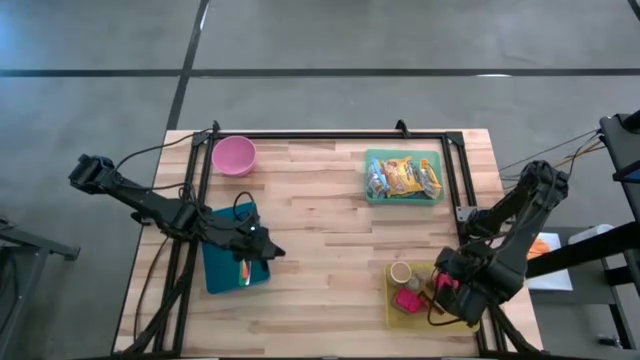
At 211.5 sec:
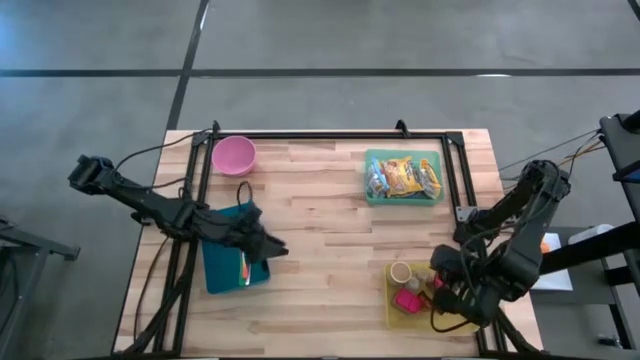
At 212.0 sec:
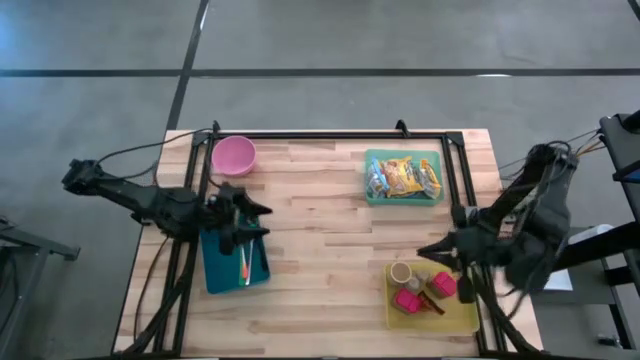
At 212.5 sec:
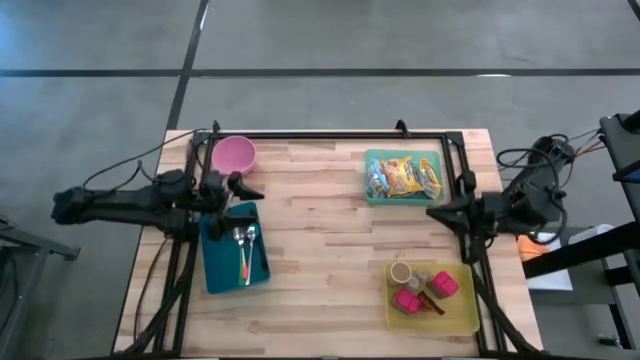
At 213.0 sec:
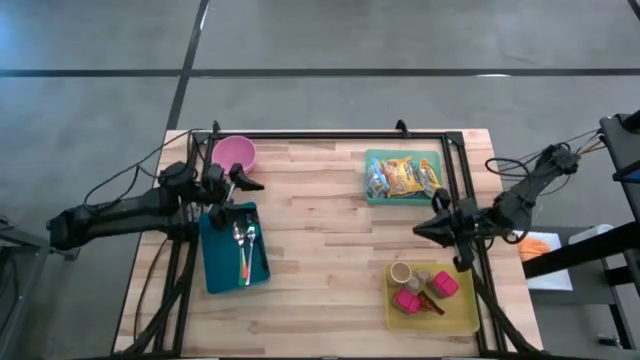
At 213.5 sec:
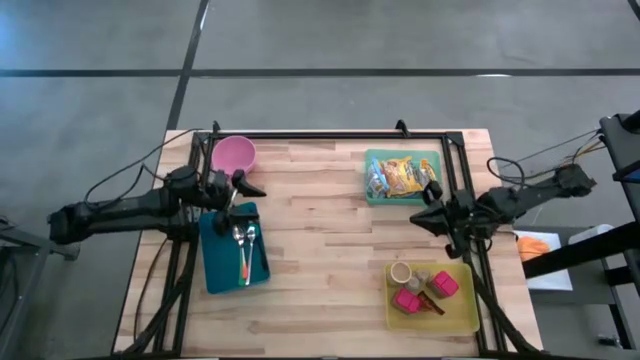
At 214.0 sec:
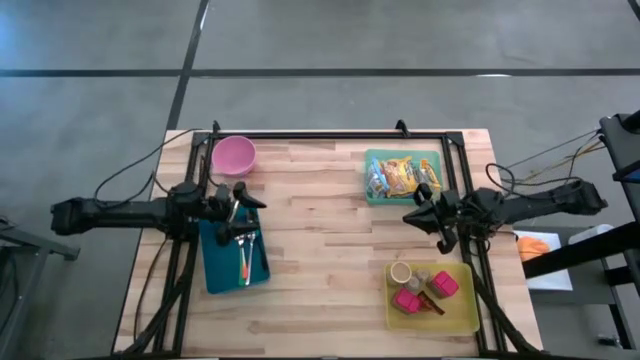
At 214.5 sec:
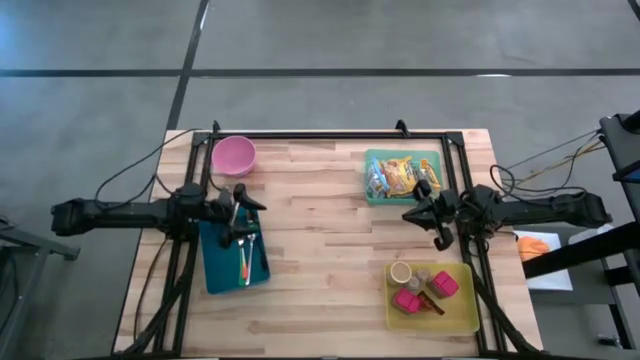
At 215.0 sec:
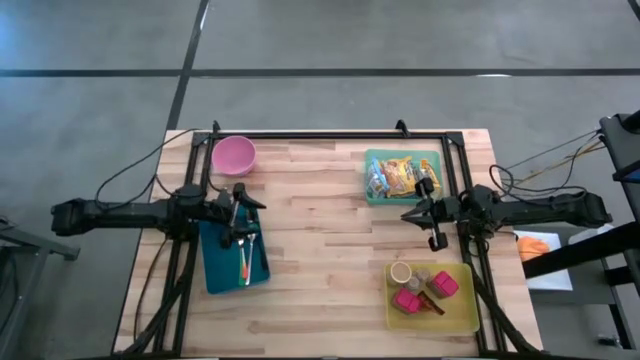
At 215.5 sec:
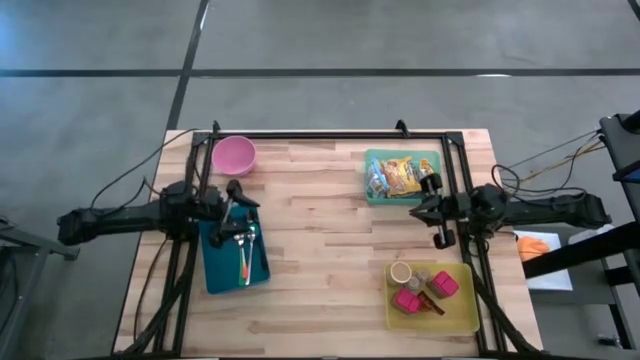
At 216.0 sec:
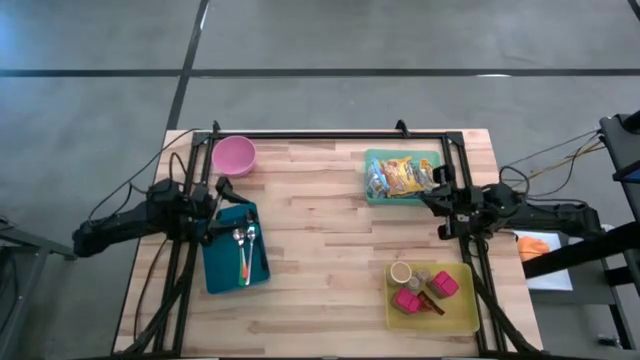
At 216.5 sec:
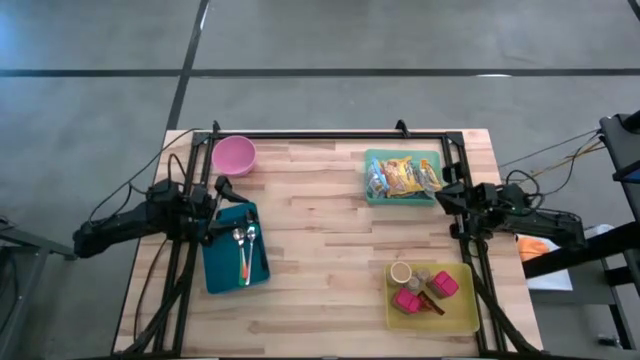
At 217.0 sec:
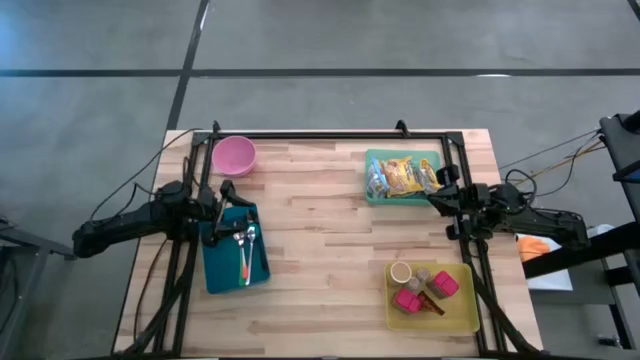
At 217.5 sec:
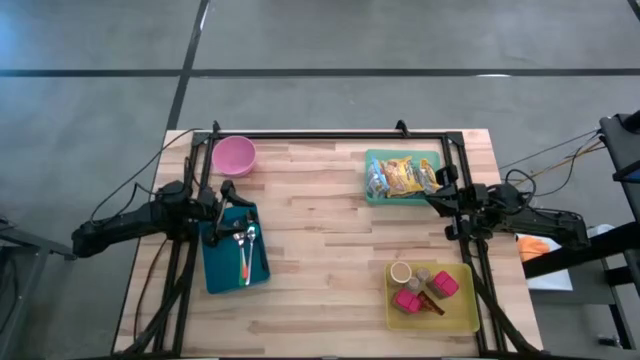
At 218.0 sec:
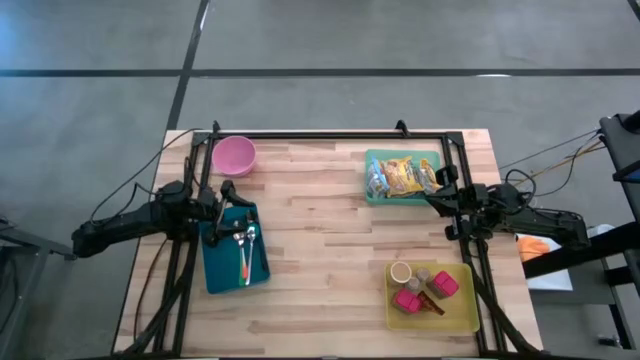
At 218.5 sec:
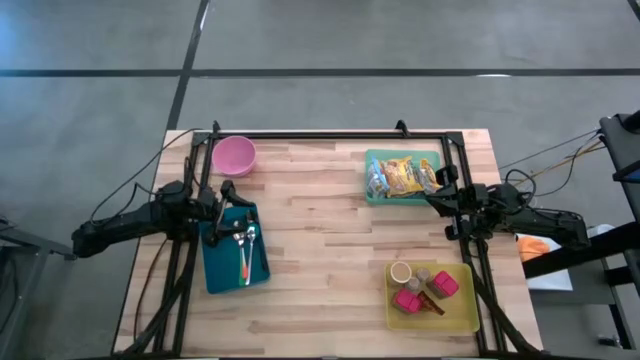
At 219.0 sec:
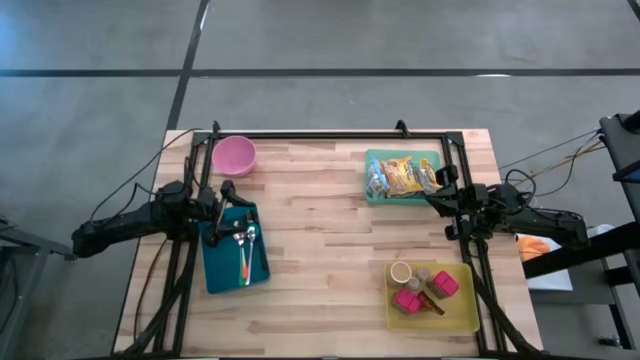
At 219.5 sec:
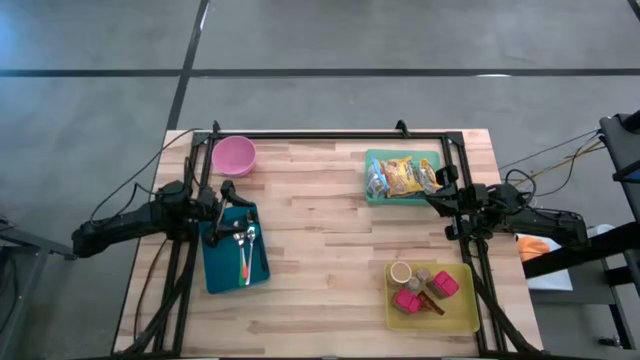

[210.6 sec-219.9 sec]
Return to Home Position

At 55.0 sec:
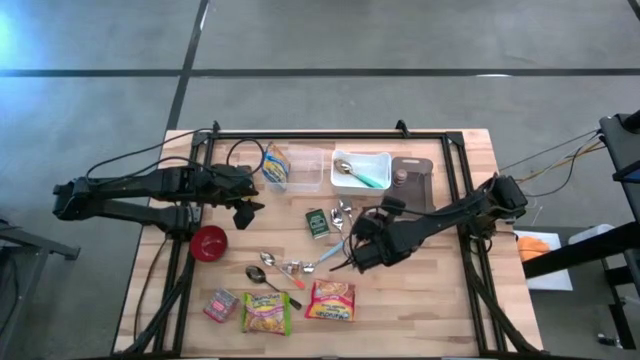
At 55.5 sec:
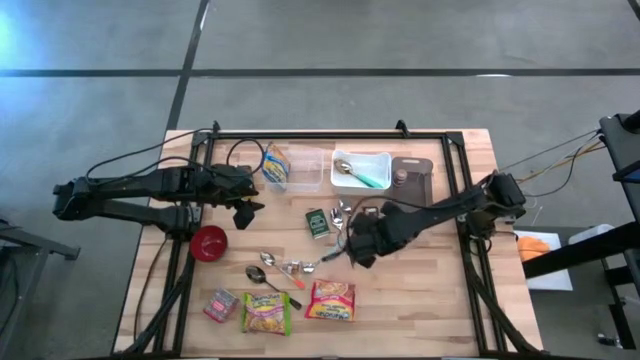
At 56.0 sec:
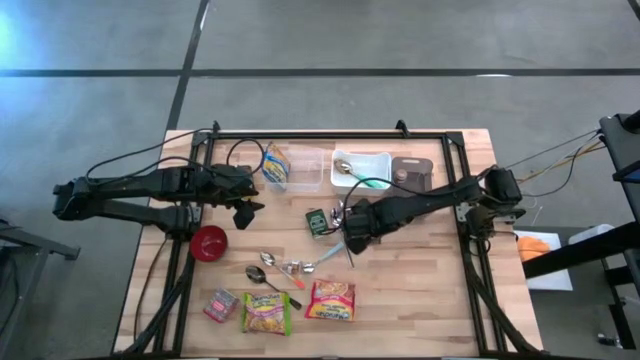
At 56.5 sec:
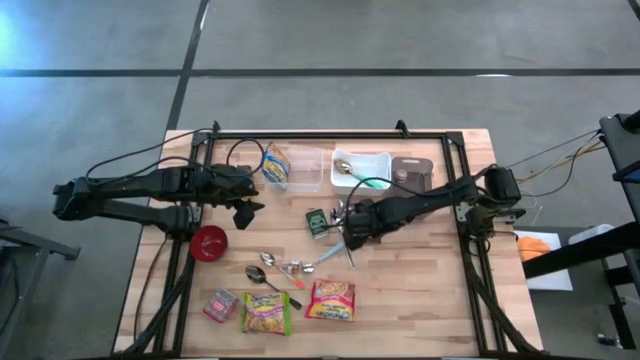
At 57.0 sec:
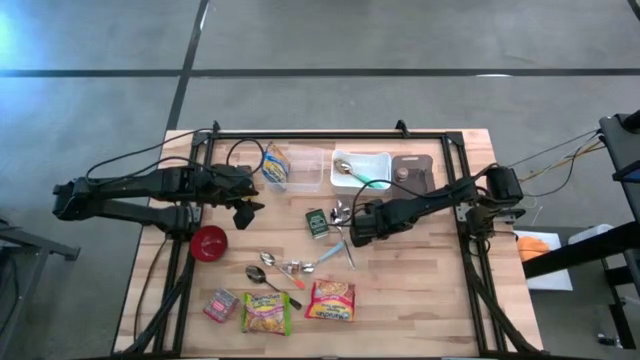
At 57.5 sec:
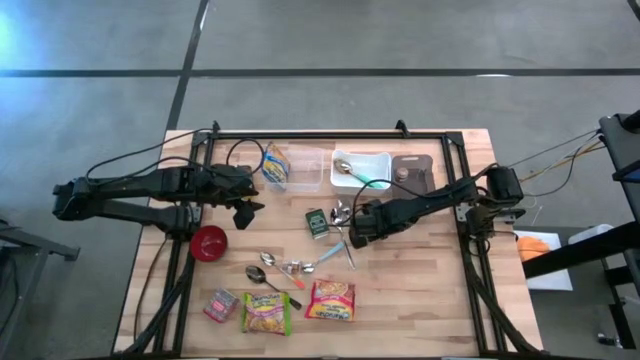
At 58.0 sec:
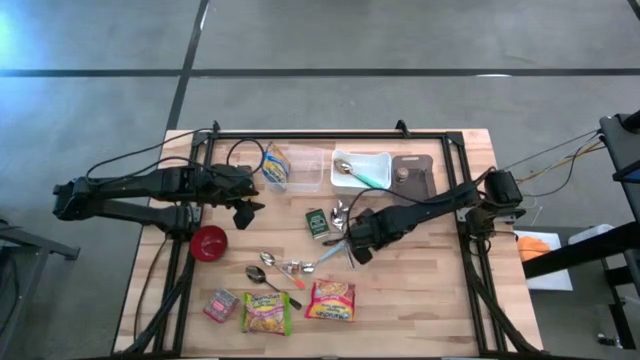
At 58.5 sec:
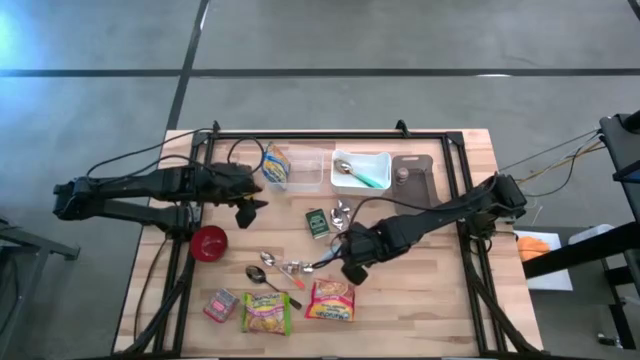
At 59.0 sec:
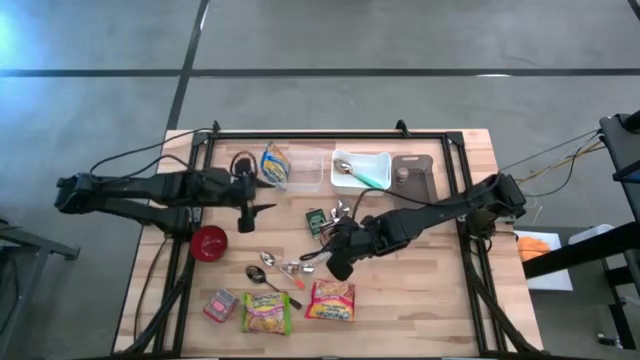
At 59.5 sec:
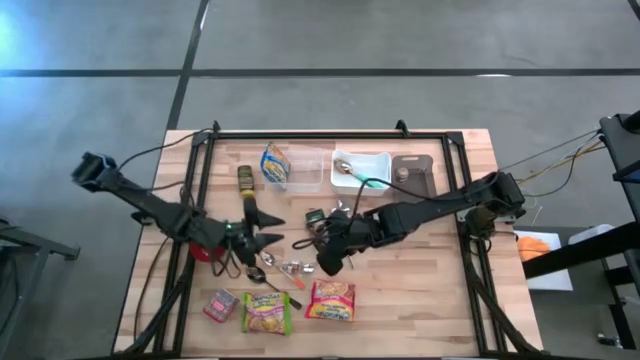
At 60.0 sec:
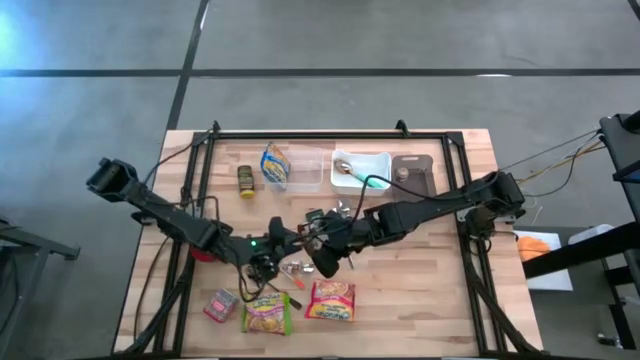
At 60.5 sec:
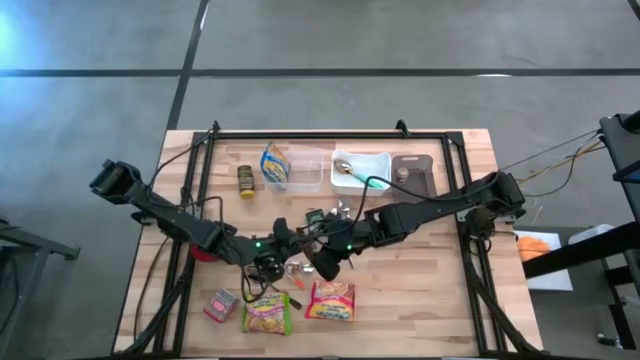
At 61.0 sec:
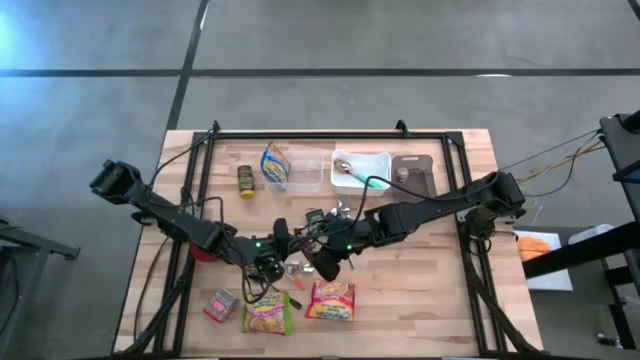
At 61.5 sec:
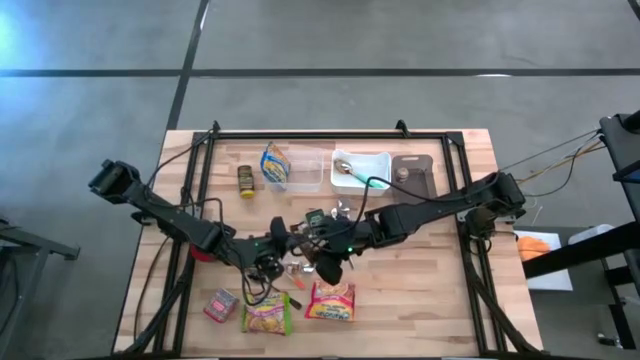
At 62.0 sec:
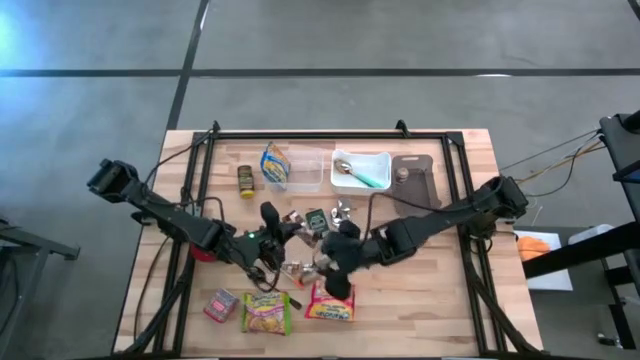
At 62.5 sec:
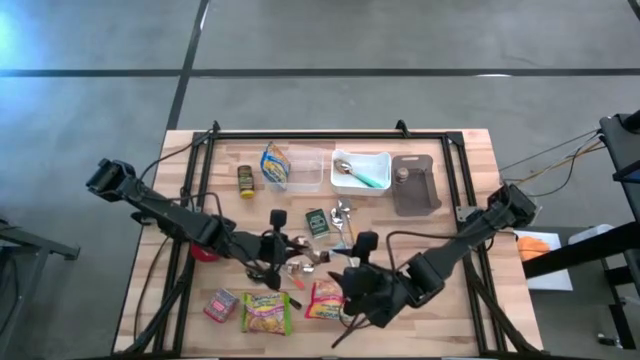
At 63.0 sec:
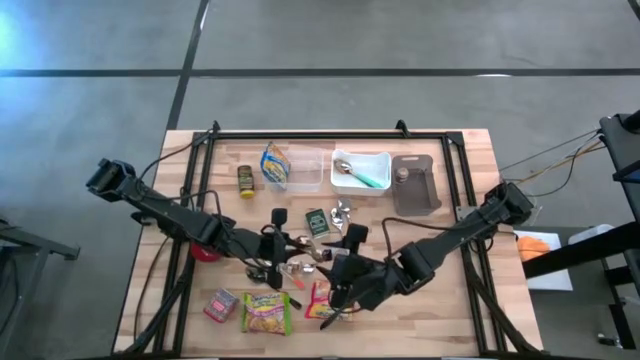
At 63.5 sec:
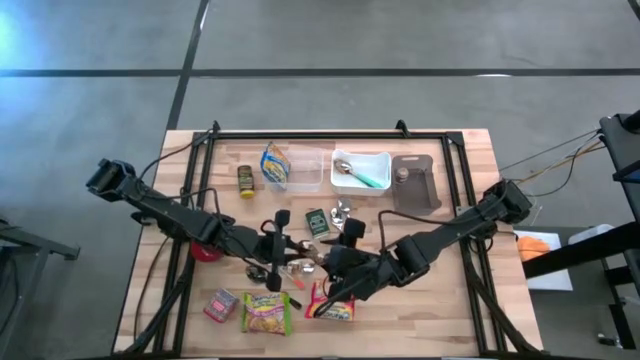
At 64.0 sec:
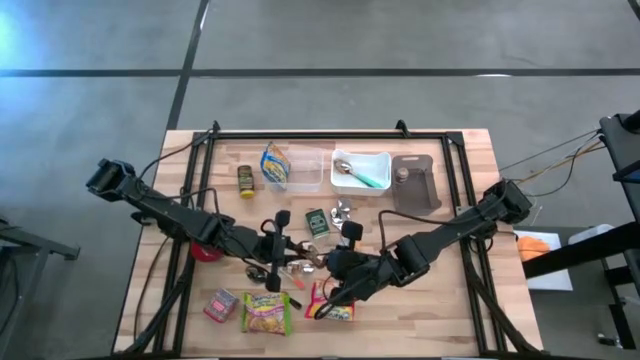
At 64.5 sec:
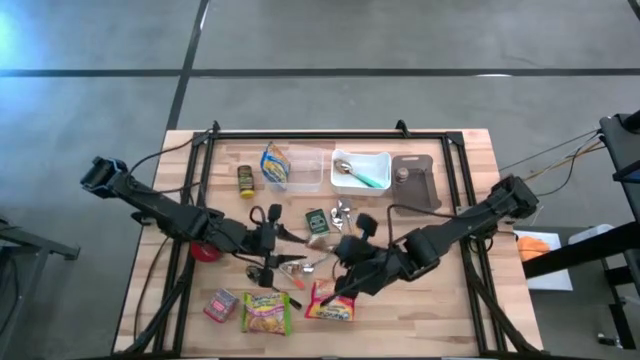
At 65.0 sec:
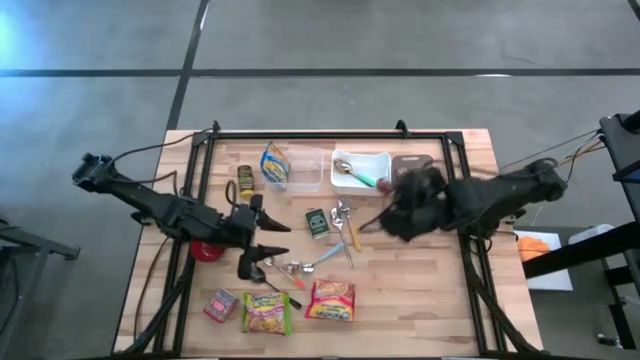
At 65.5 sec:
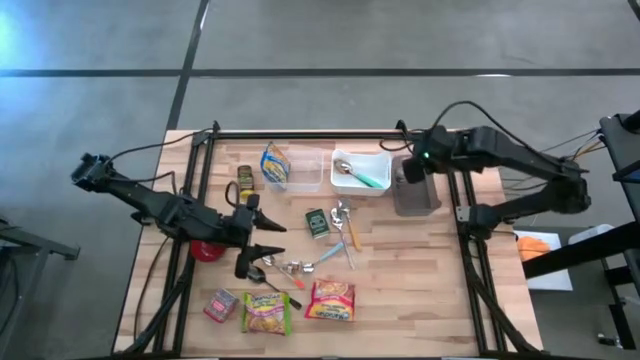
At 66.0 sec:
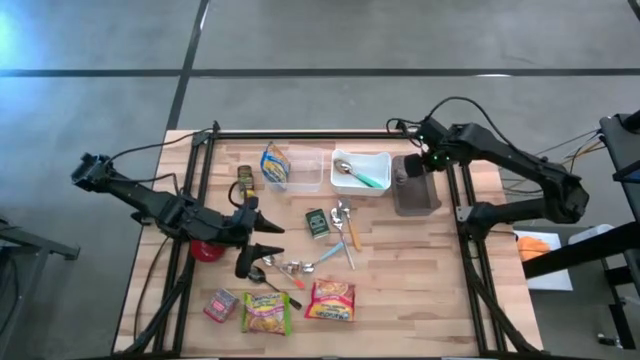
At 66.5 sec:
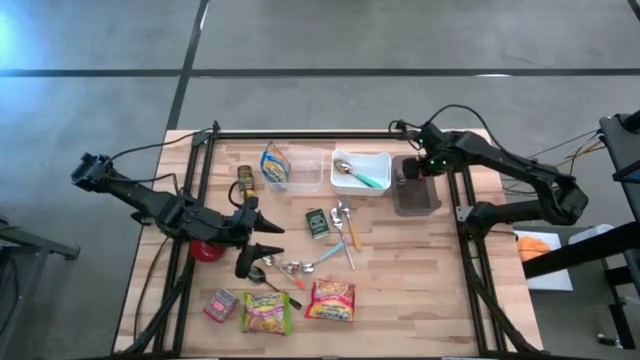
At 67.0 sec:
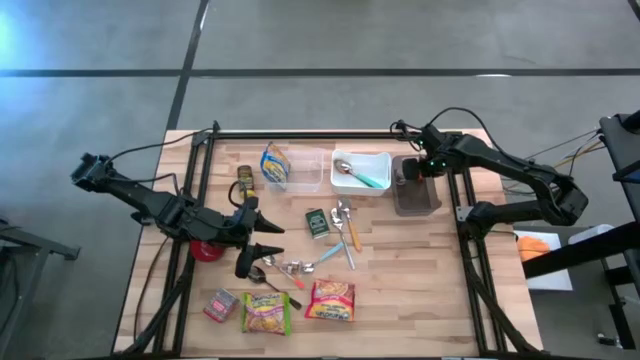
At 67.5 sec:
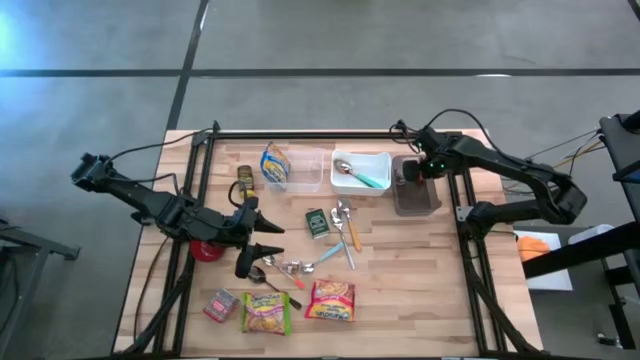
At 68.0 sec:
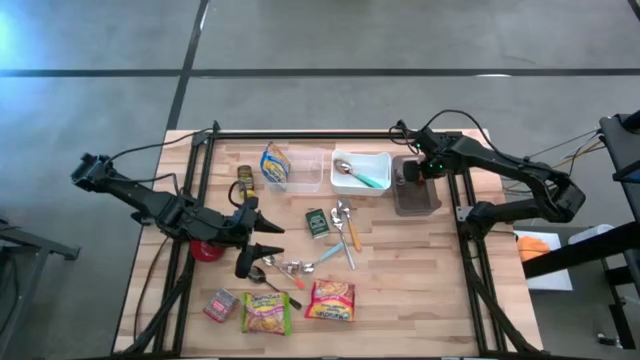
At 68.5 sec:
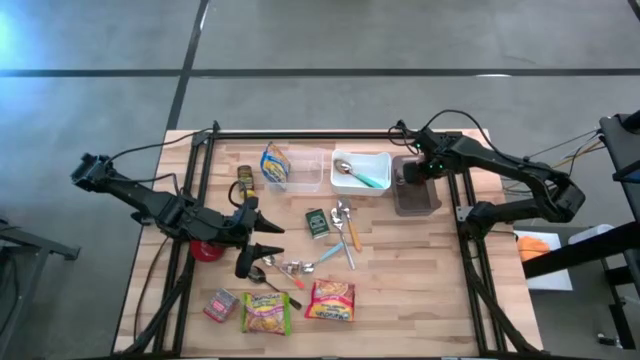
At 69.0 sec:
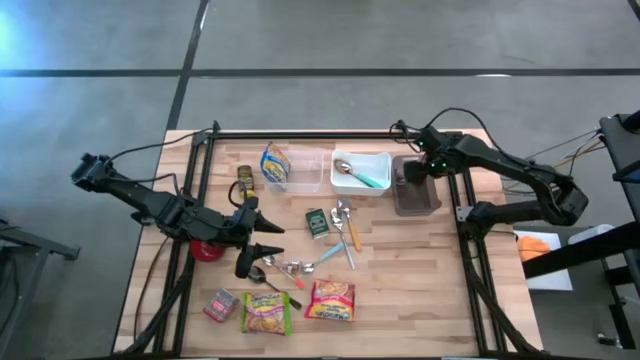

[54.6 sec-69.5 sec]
Put the orange seasoning bag into the black bin
